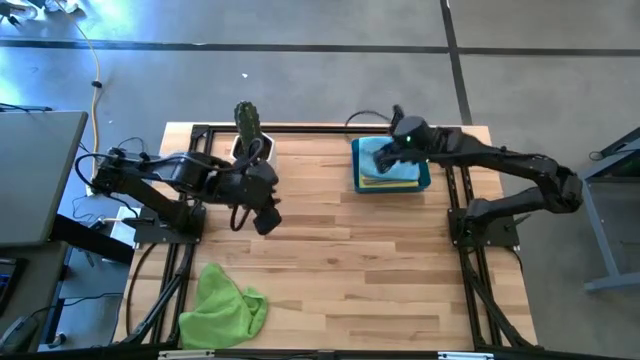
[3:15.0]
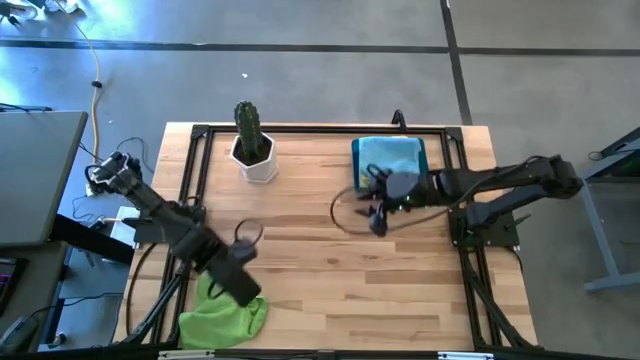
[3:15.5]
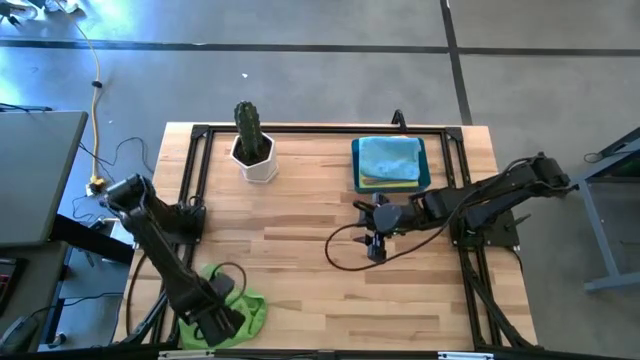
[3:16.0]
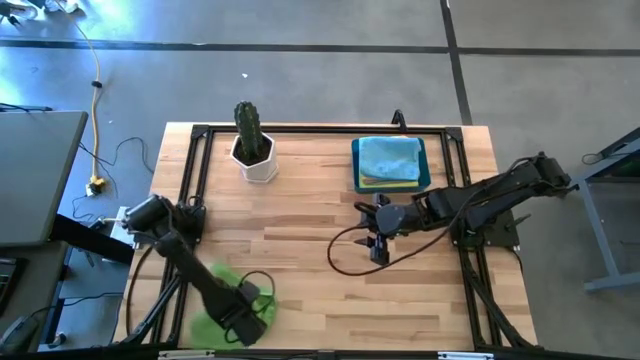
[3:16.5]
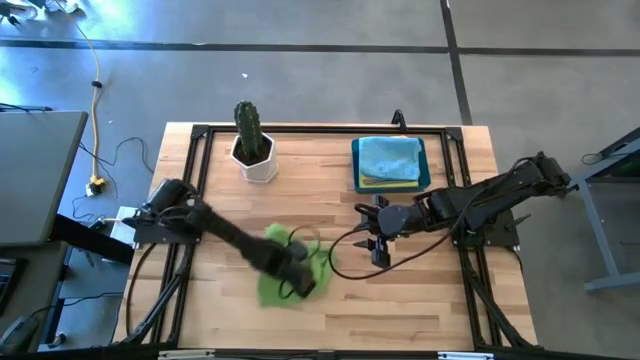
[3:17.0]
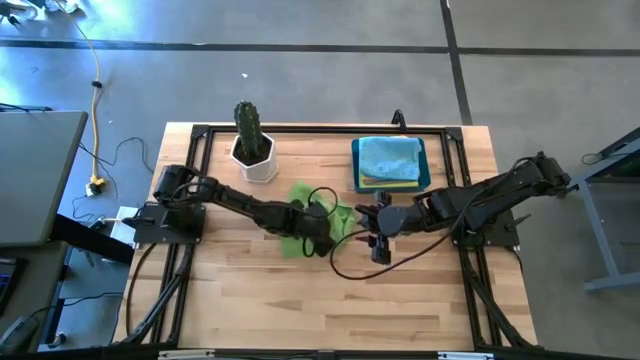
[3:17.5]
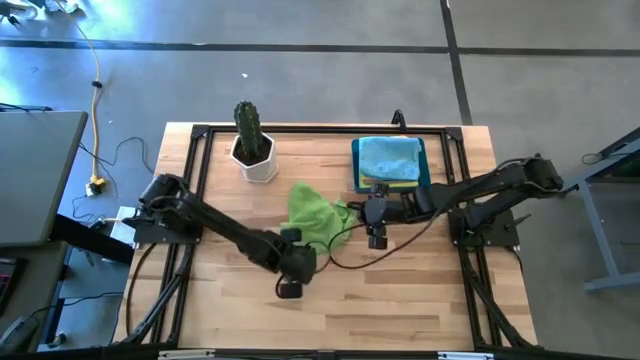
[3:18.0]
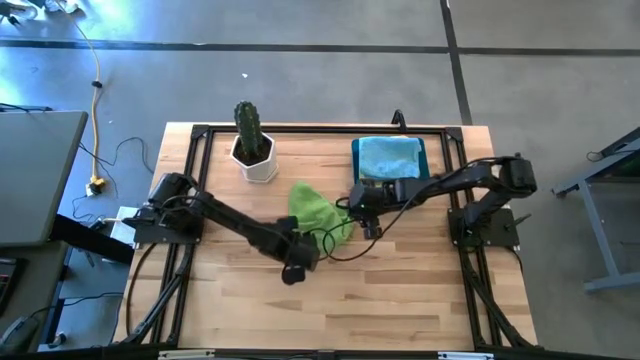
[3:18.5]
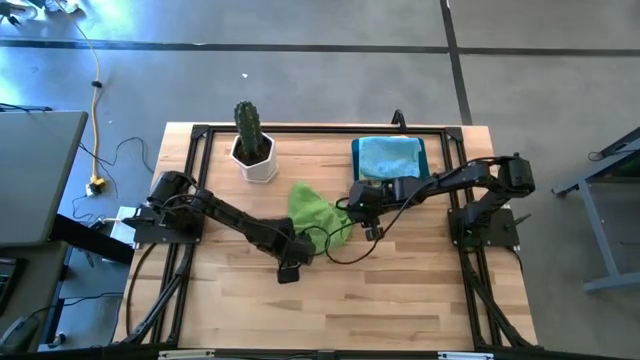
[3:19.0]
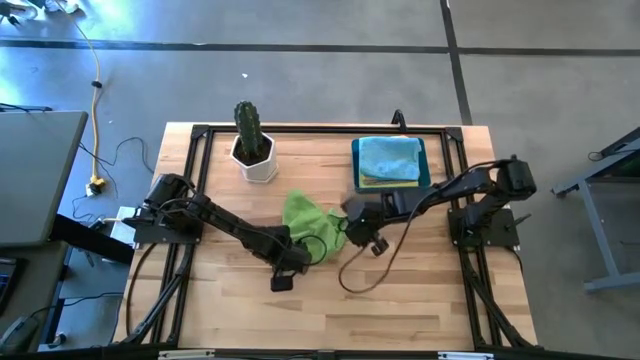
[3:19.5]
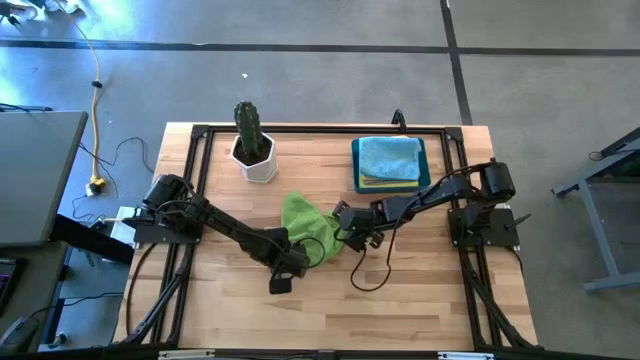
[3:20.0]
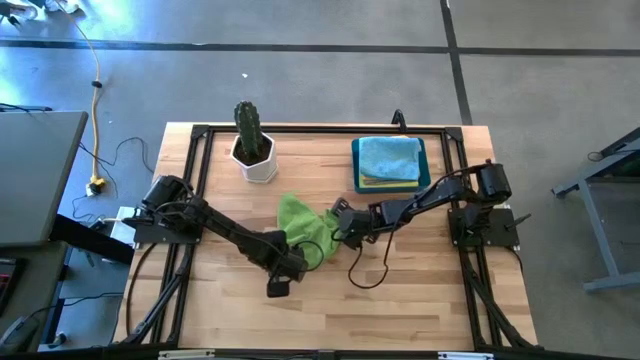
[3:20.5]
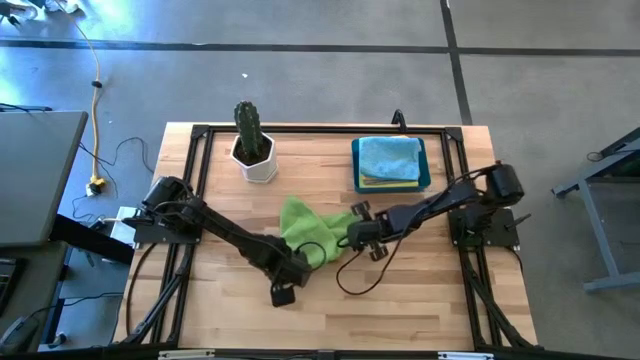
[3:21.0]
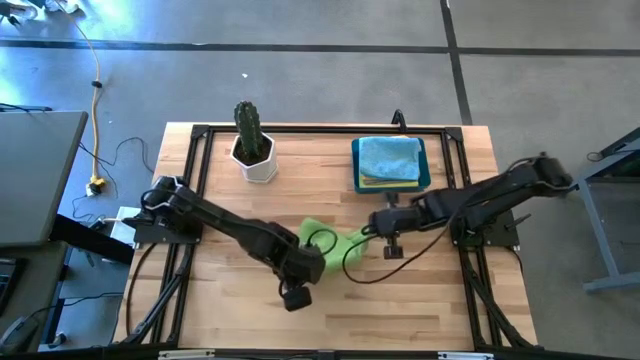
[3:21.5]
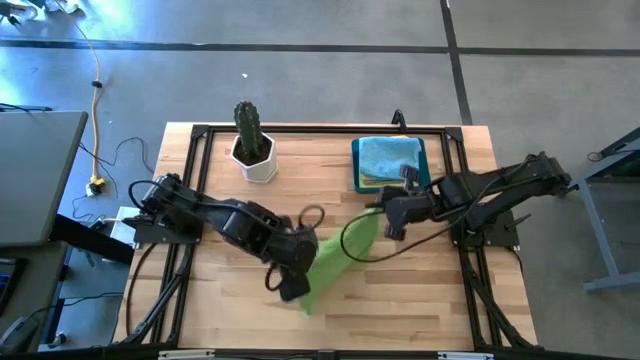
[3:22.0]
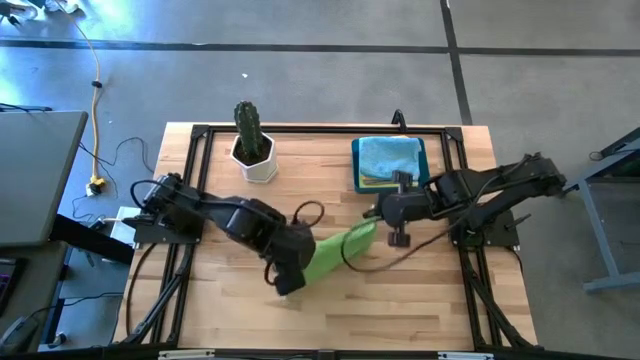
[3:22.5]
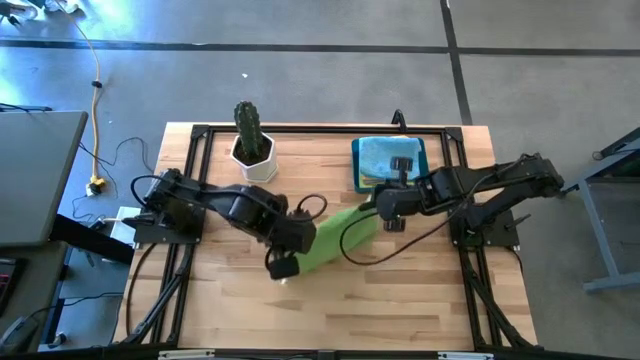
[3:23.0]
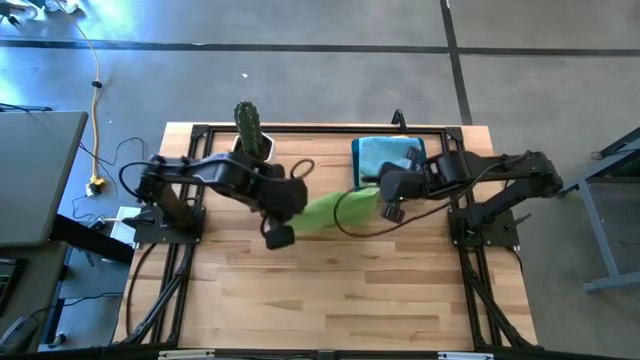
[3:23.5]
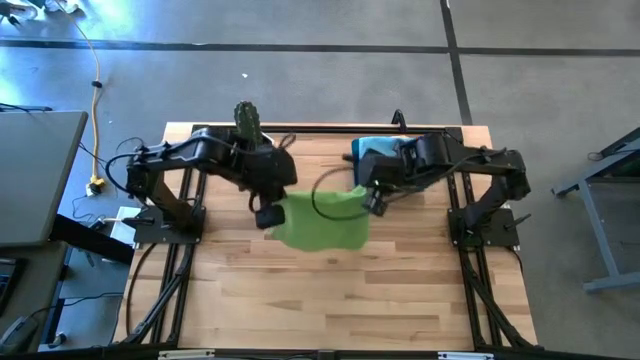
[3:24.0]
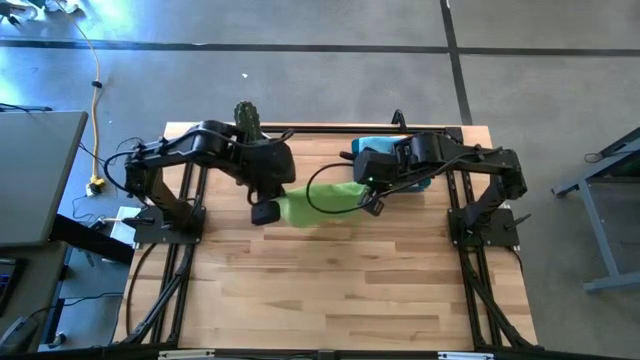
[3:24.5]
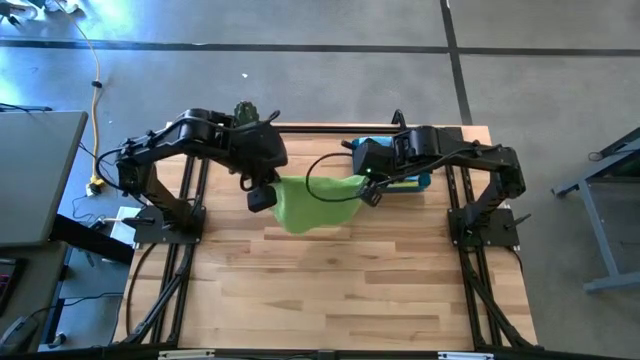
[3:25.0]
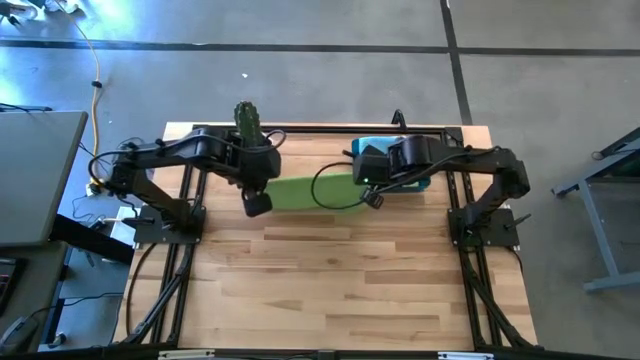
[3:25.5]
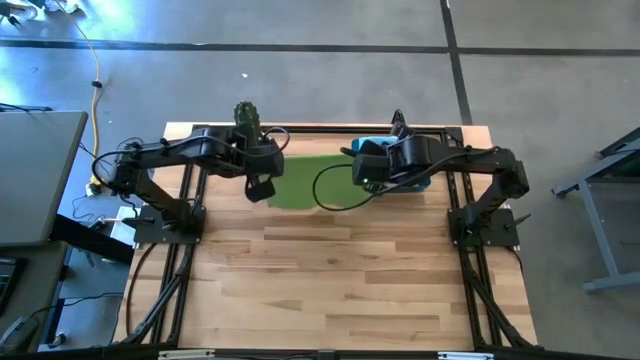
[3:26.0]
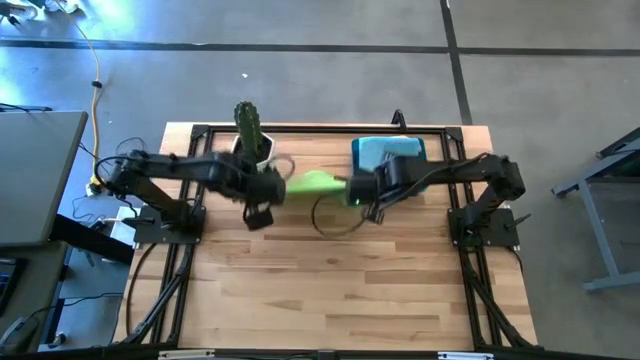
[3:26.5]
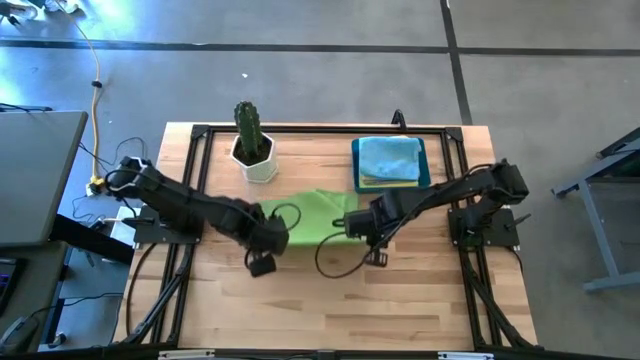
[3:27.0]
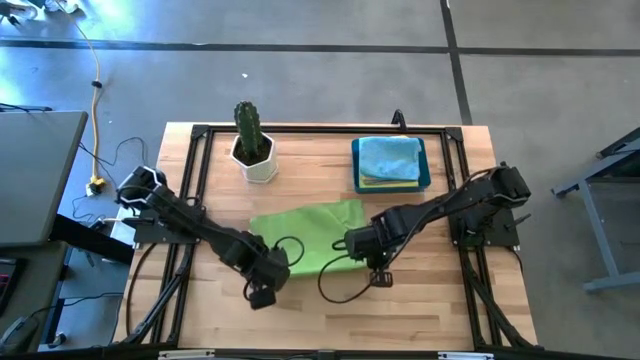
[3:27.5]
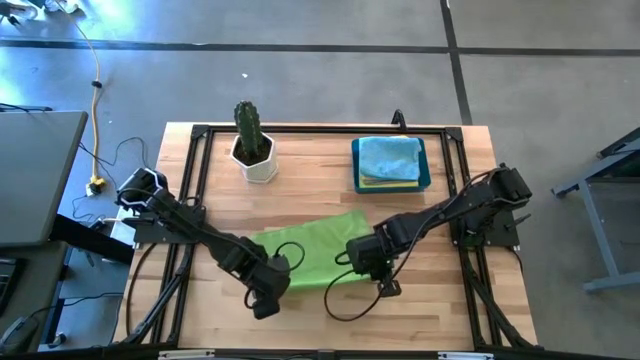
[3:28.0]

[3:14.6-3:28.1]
Task: Fold microfiber towels
Fold the green microfiber cloth

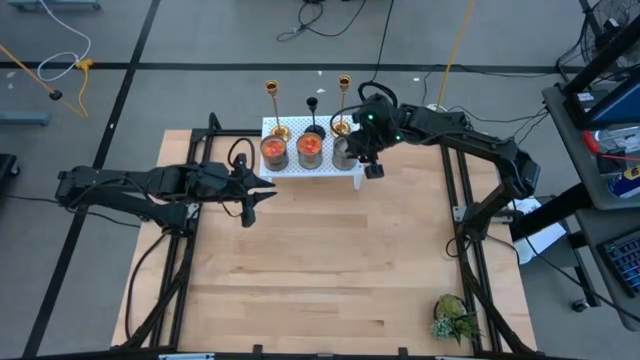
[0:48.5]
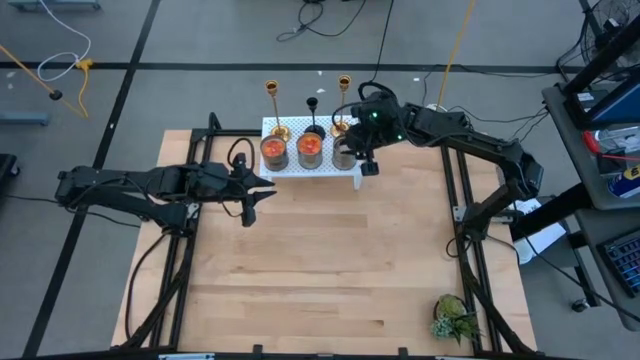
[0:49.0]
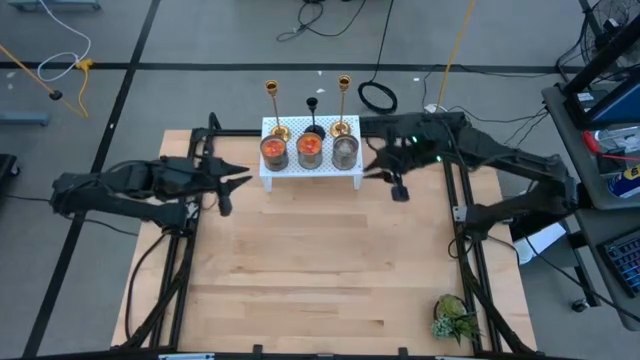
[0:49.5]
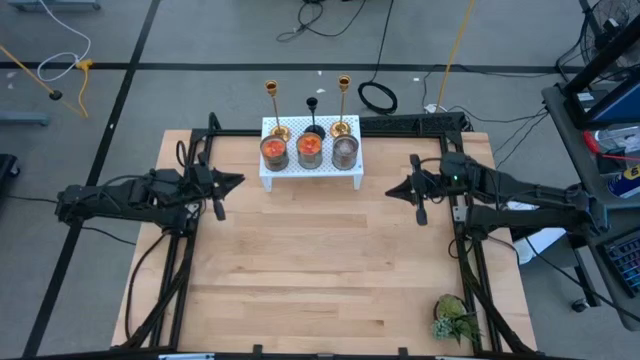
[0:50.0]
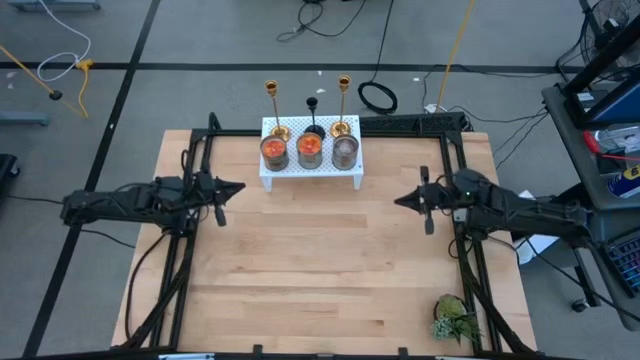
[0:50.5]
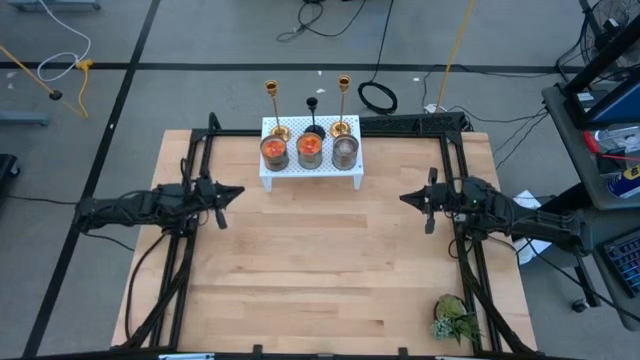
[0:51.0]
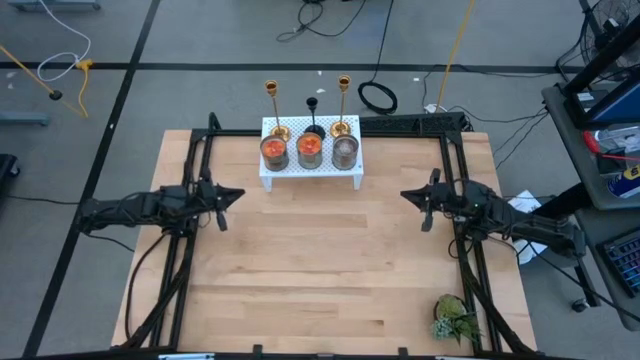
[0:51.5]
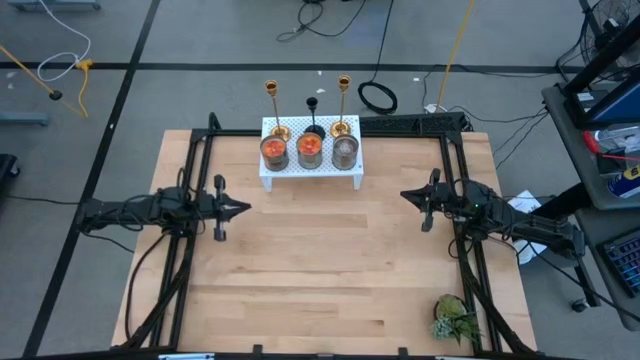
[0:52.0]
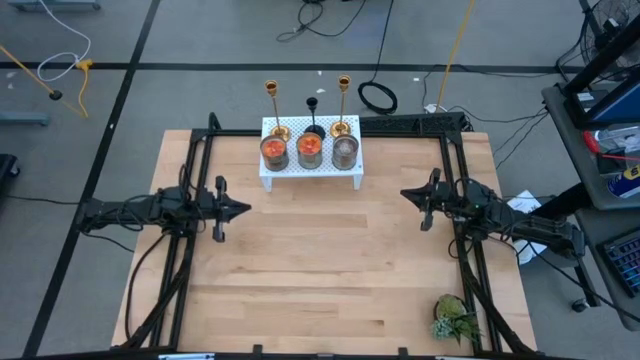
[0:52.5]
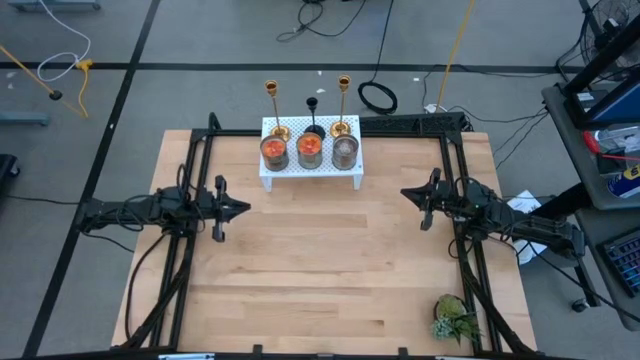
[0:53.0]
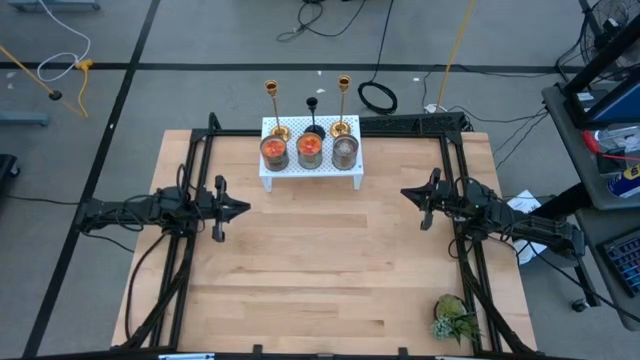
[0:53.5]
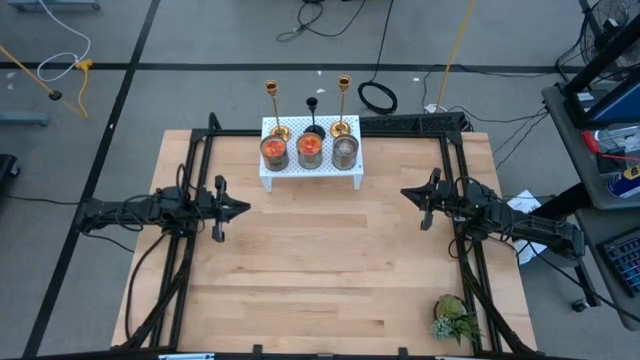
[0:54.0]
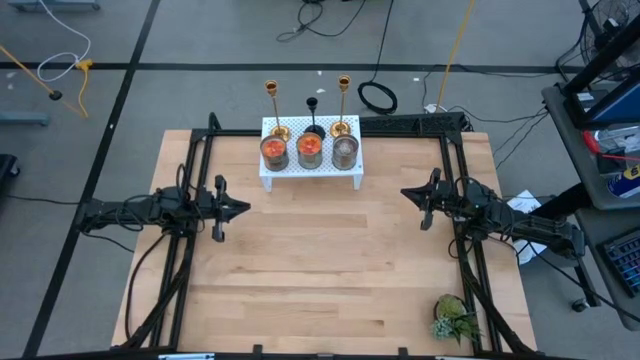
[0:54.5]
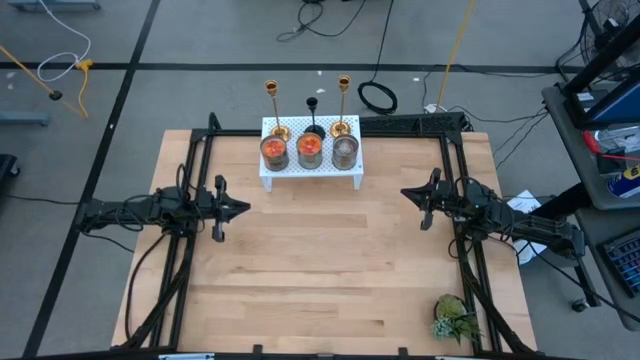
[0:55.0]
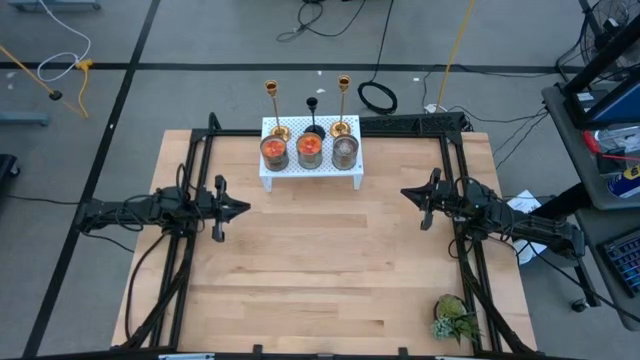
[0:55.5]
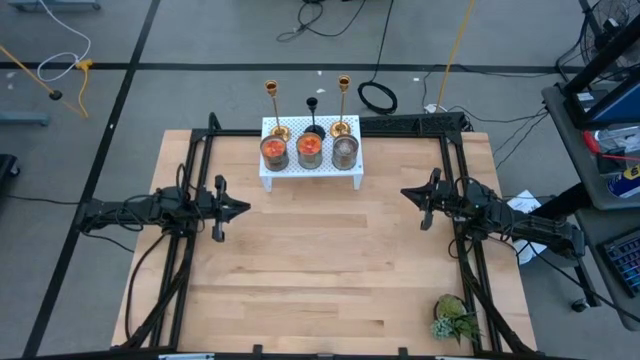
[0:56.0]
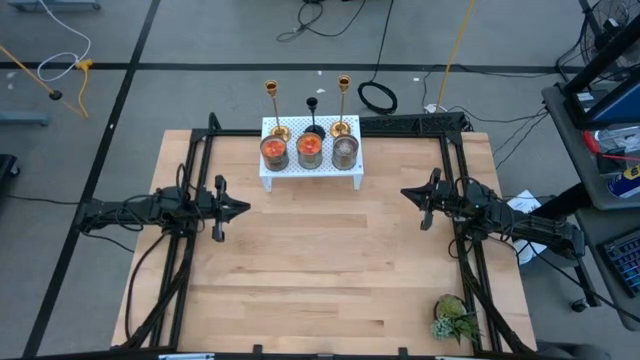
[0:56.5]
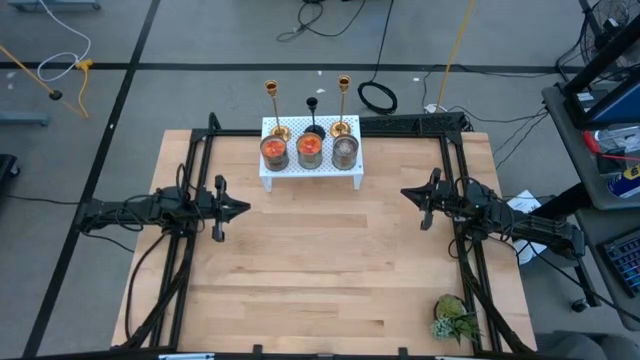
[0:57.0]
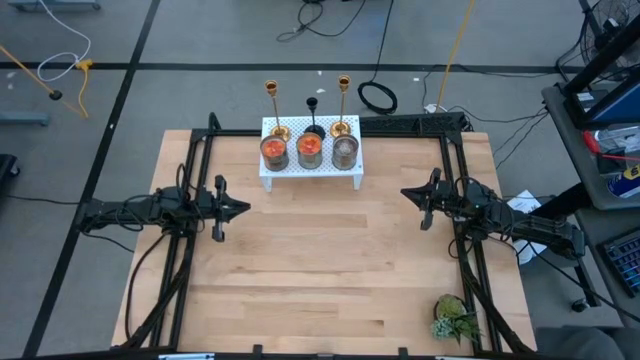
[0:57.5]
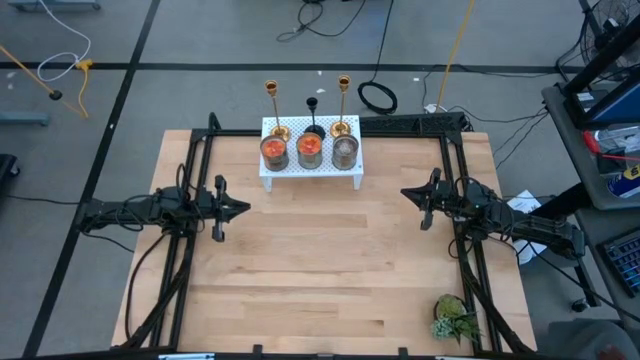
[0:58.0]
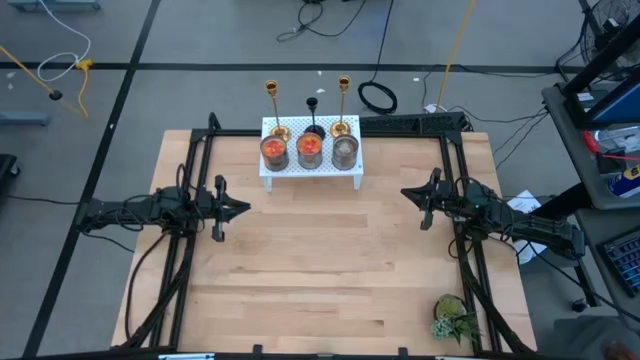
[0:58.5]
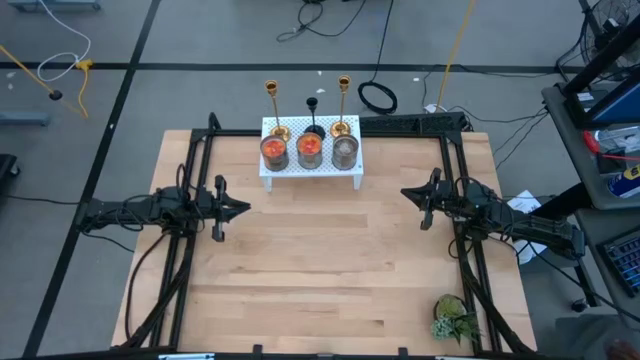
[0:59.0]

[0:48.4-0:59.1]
Task: Pick & Place candle stick holders
Return to Home Position
